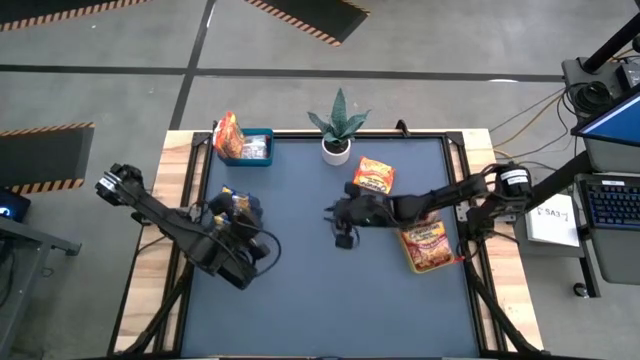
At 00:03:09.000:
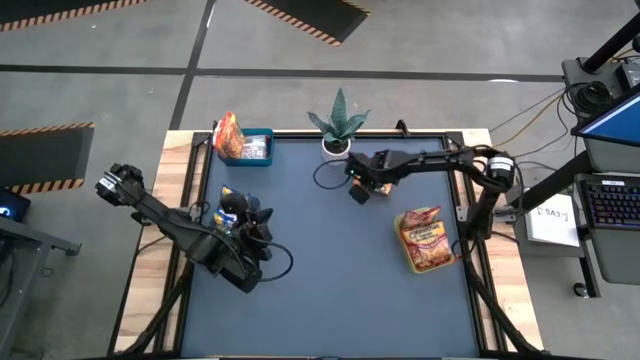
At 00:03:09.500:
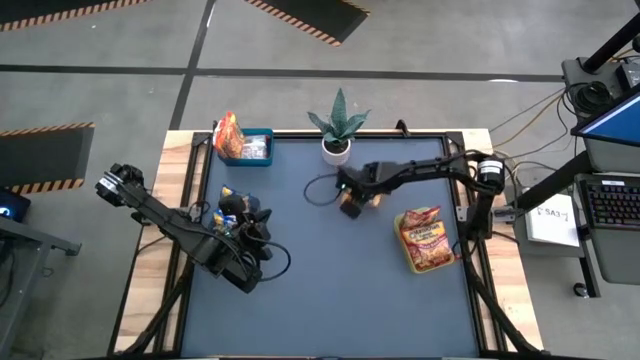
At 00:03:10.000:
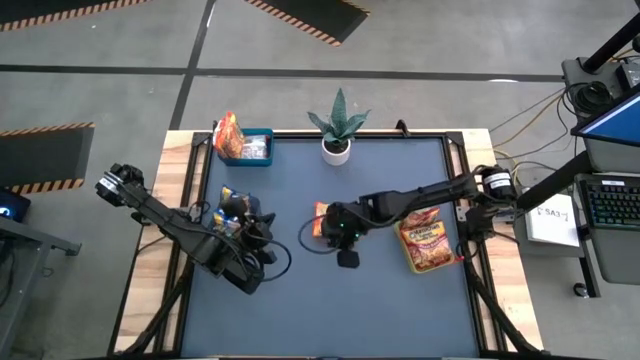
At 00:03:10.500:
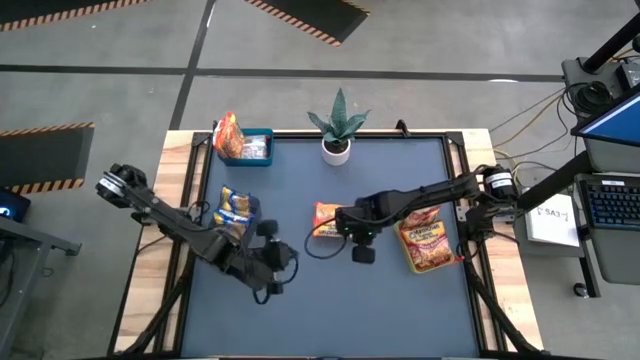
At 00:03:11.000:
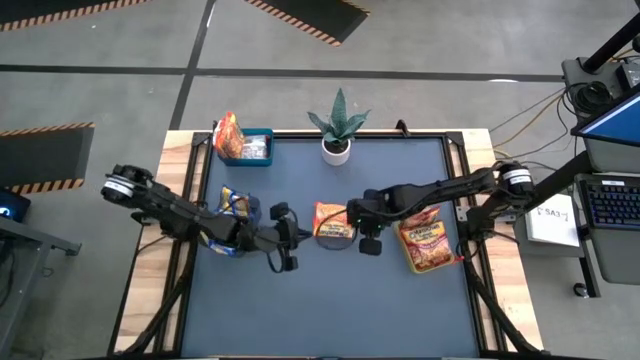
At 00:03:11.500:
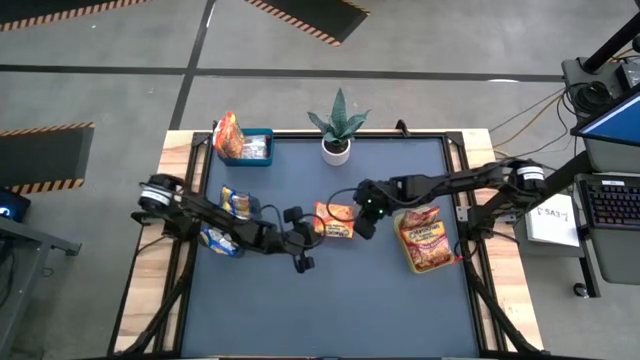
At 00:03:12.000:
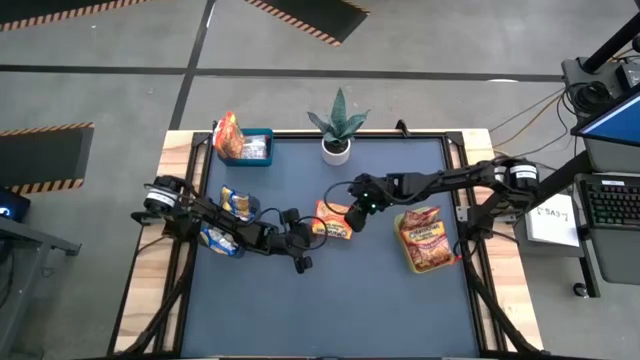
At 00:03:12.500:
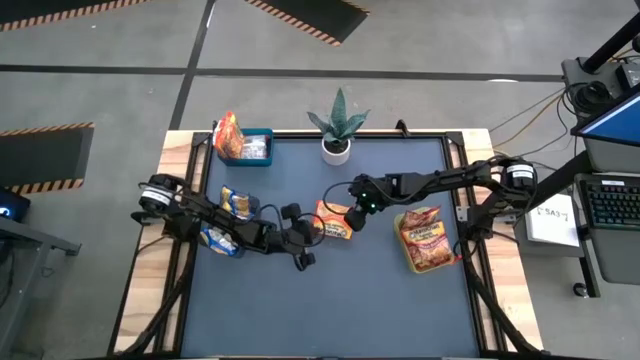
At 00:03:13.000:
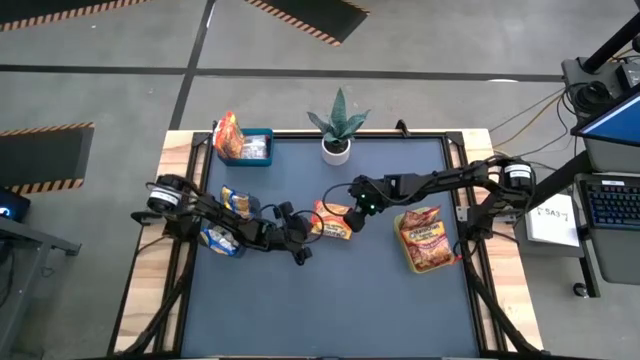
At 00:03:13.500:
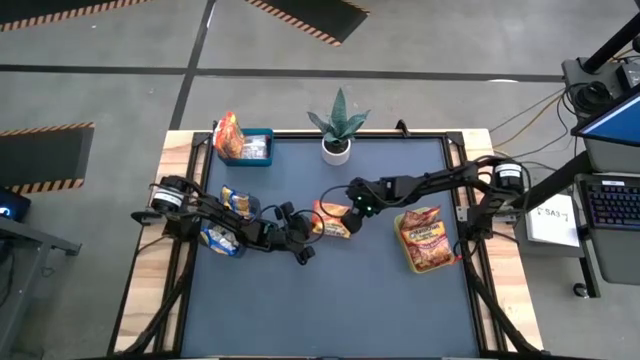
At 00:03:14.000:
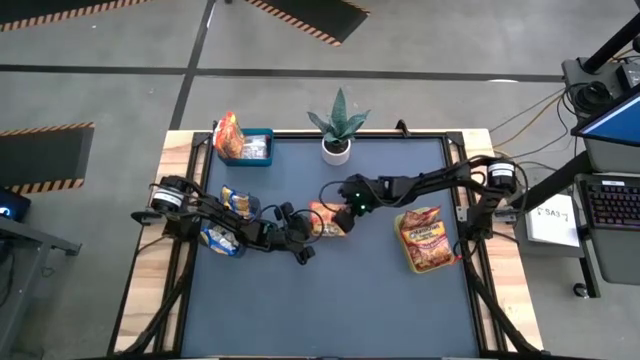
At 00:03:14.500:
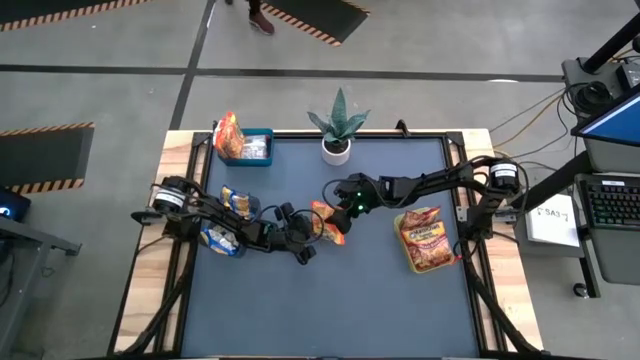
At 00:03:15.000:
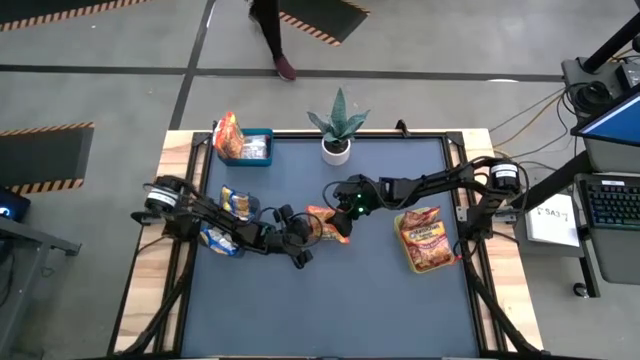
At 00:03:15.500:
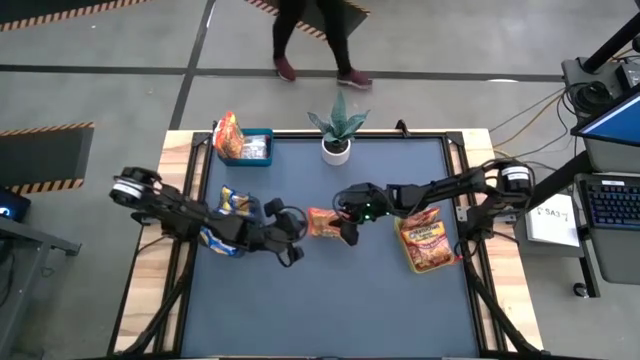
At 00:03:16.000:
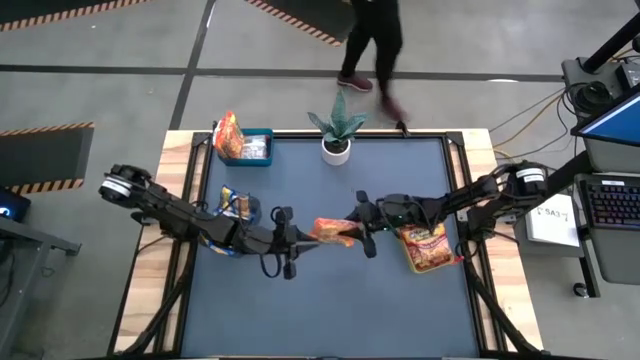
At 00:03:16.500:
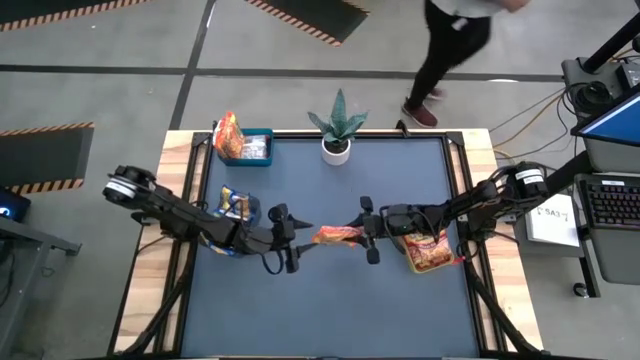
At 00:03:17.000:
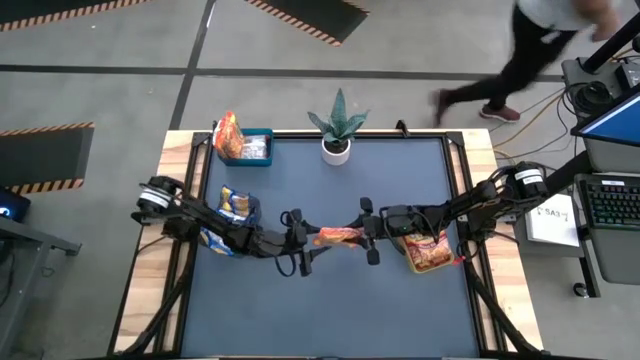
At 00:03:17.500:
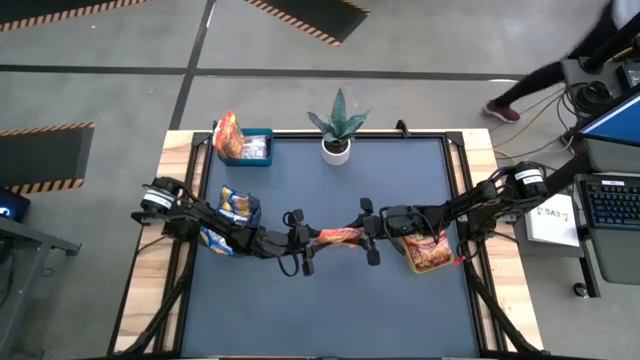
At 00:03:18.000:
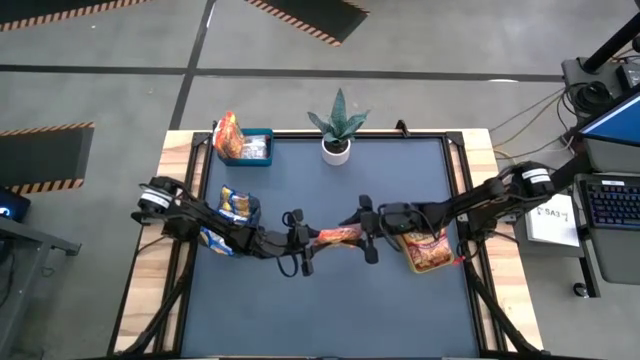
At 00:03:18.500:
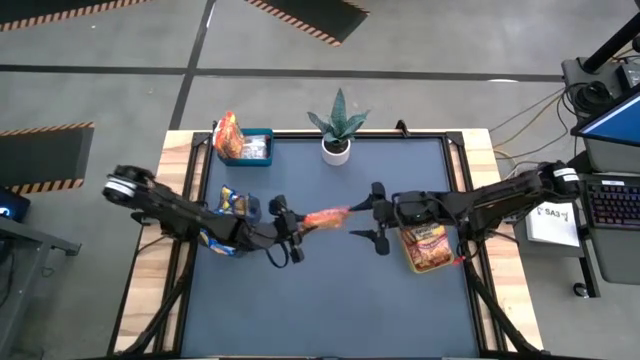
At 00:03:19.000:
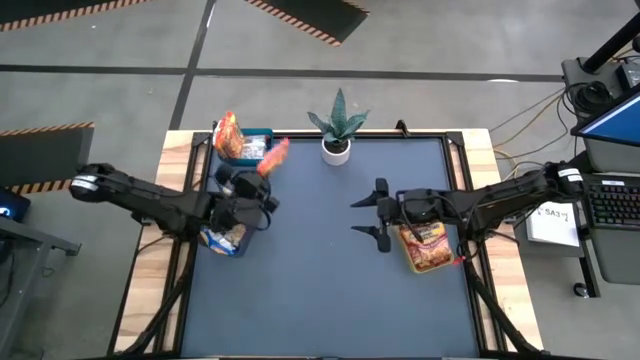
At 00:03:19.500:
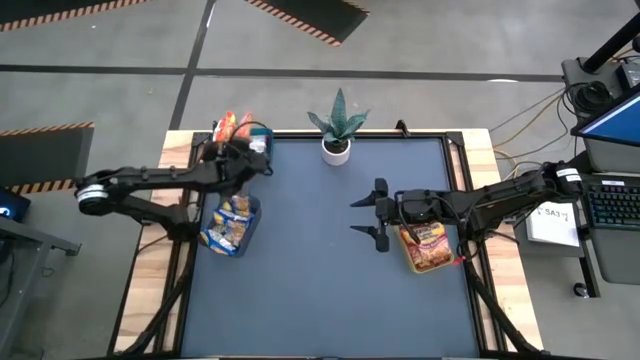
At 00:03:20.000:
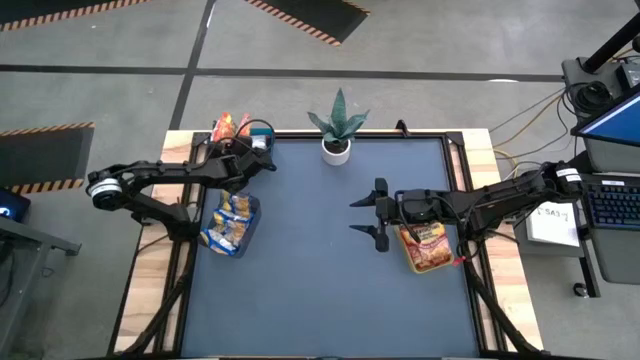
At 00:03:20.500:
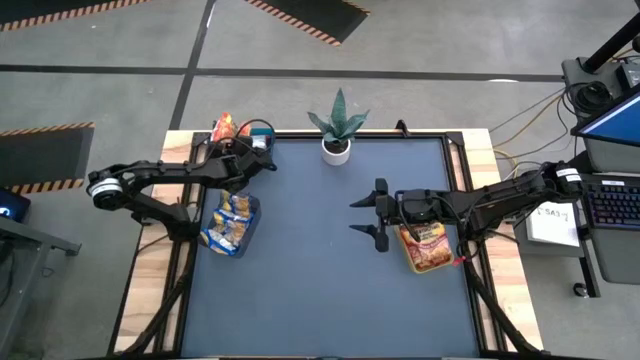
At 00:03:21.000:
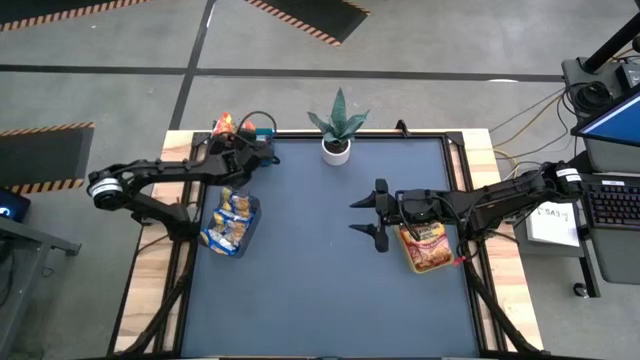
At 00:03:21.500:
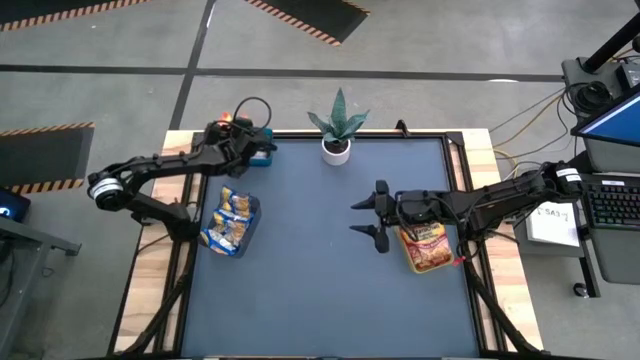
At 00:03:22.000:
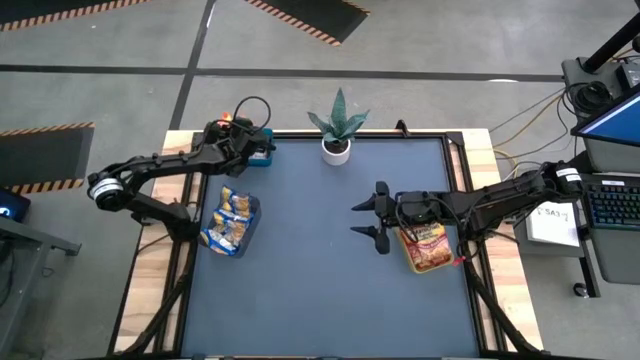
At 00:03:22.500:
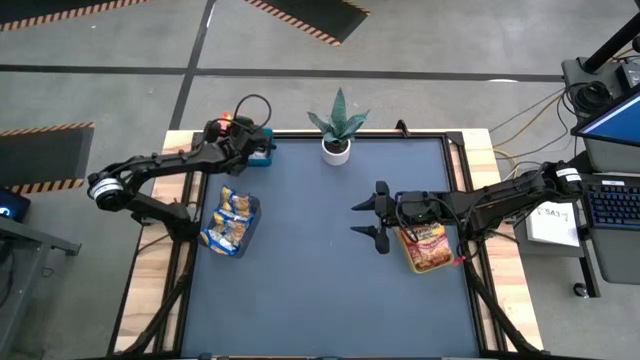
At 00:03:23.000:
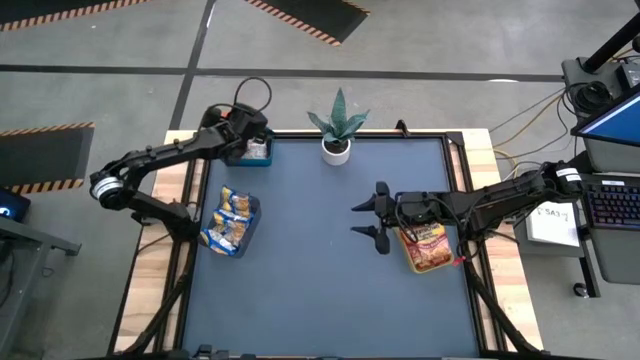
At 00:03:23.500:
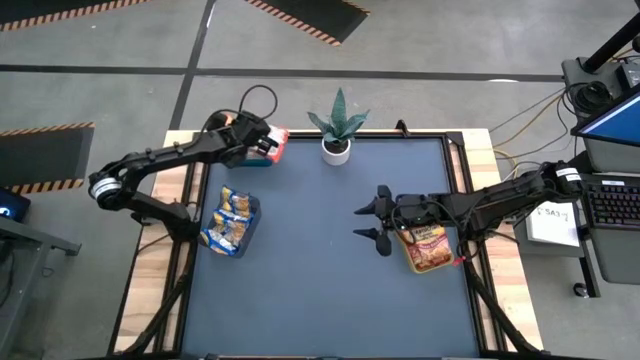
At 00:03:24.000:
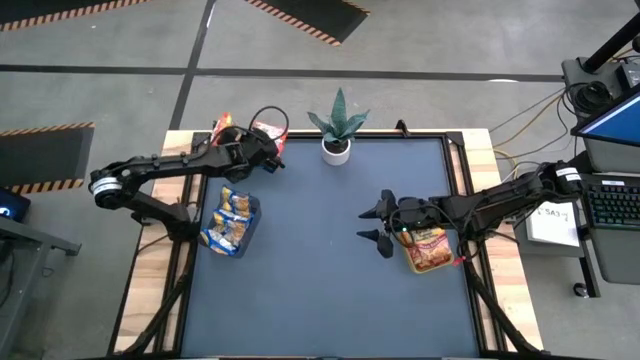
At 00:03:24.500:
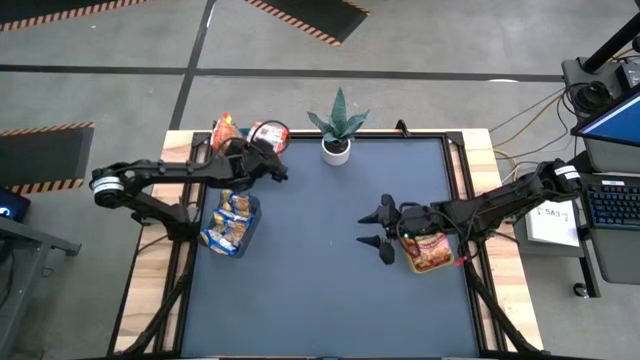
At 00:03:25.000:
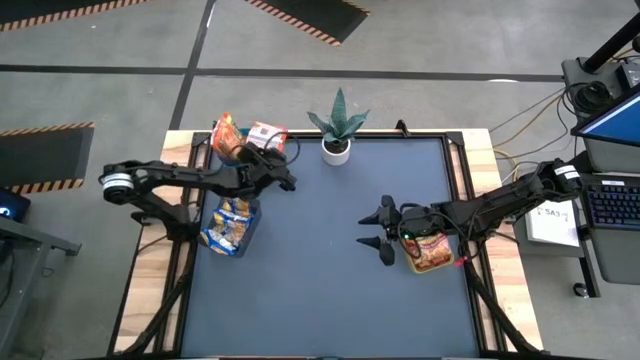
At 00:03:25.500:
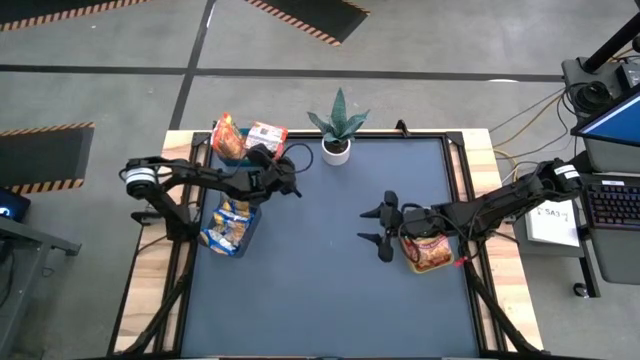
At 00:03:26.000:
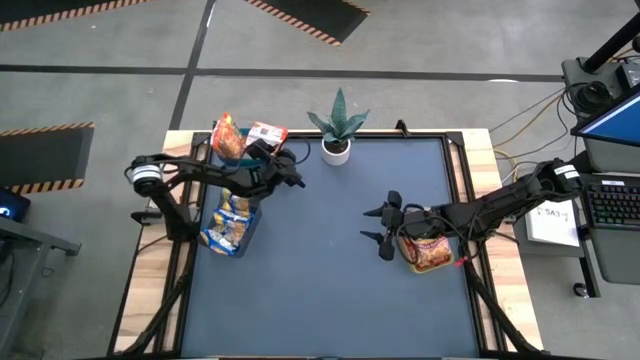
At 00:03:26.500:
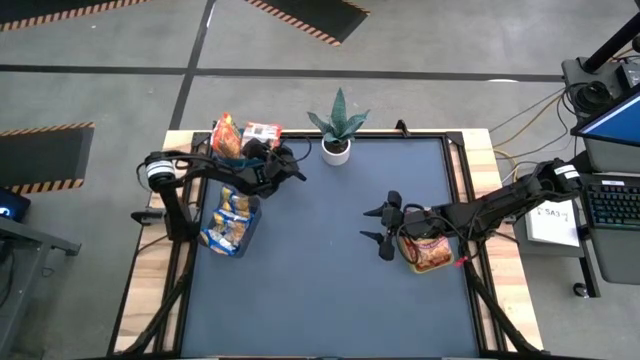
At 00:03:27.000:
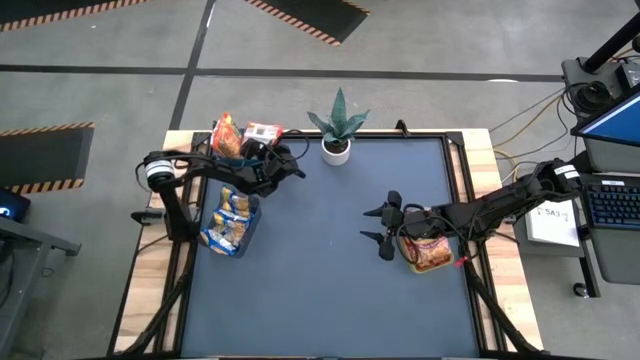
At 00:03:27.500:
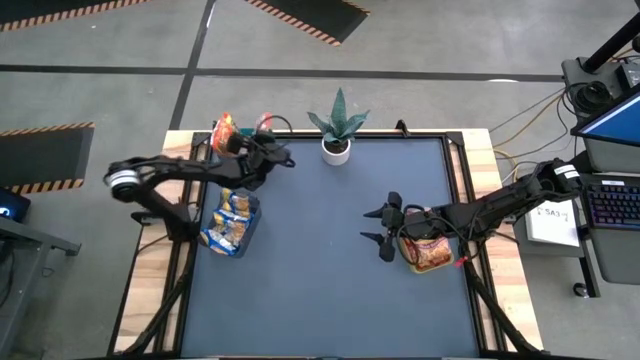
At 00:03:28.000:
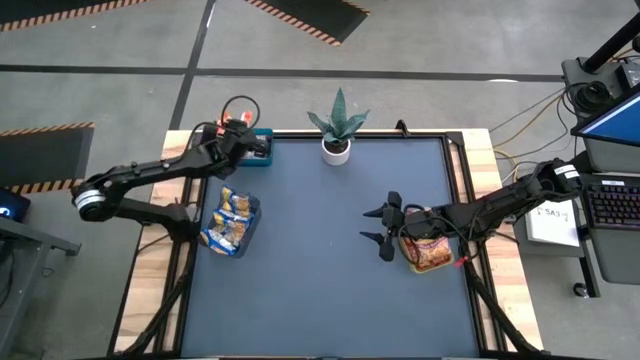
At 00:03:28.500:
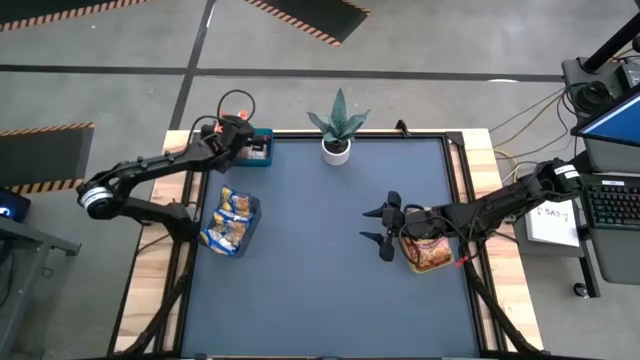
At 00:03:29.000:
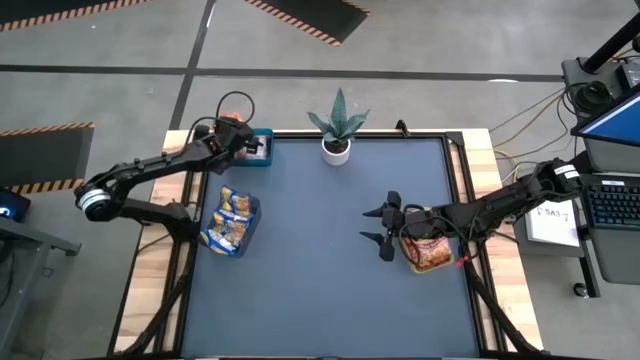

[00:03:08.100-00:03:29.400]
Task: Sort Maruchan noodles
Put the orange noodle pack into the blue bin

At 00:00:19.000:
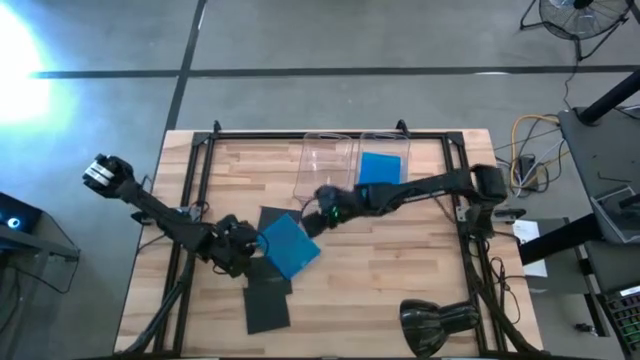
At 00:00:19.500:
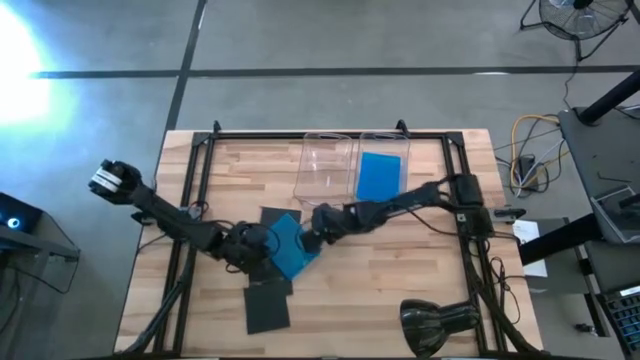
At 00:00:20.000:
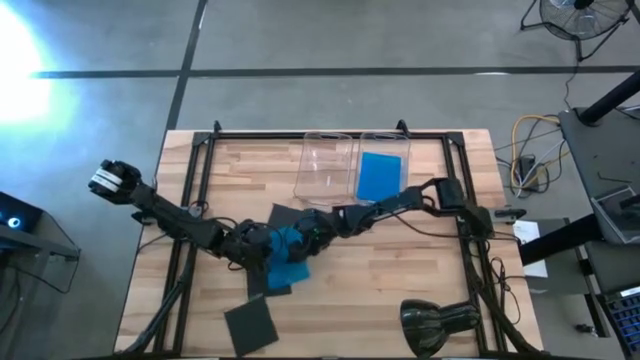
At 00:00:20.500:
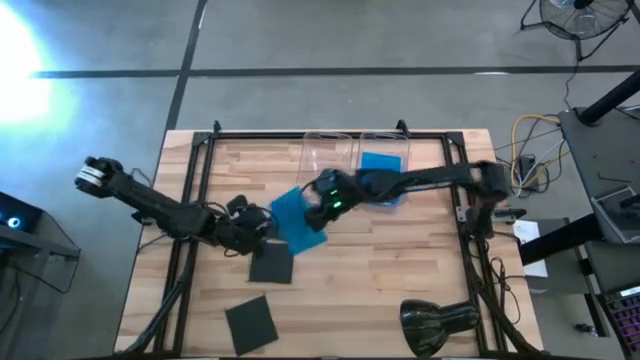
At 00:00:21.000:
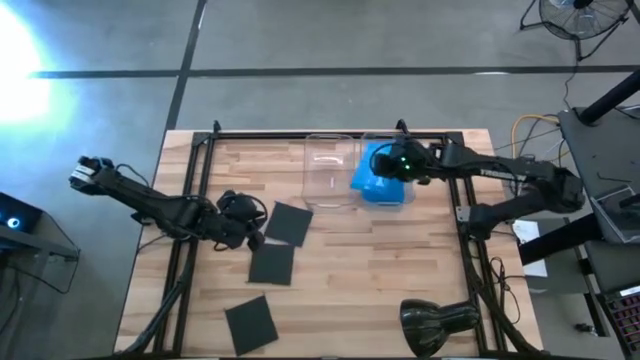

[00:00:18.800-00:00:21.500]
Task: Pick & place jewel cases by type
Put the blue CD case into the right transparent bin
